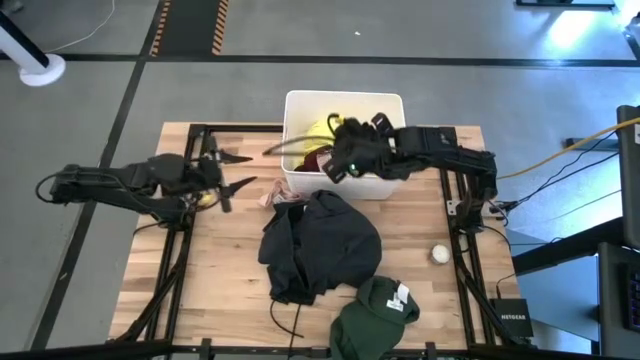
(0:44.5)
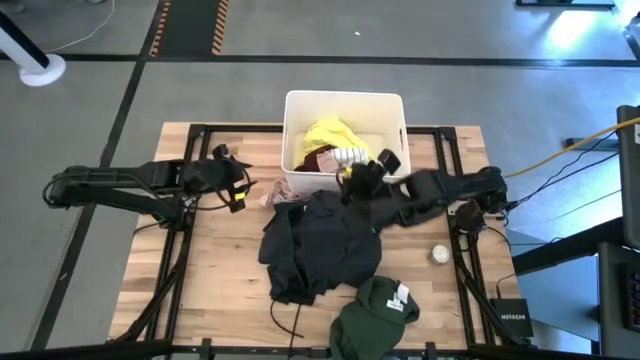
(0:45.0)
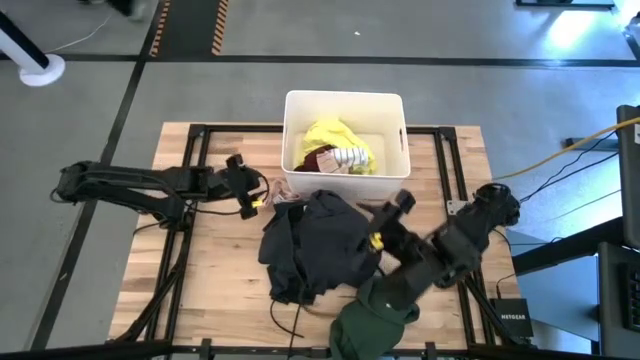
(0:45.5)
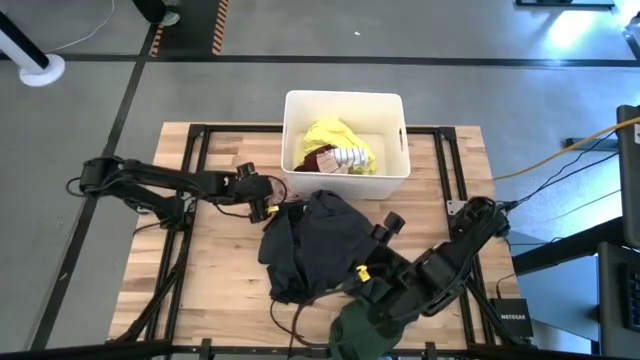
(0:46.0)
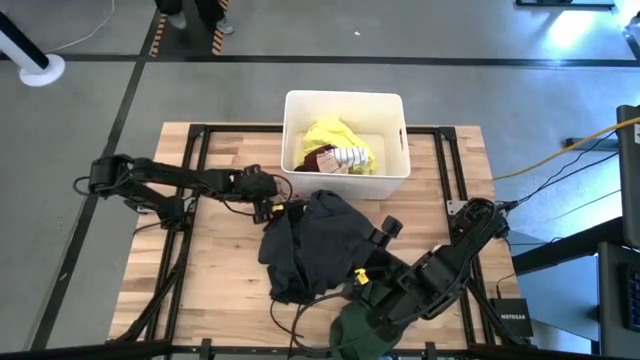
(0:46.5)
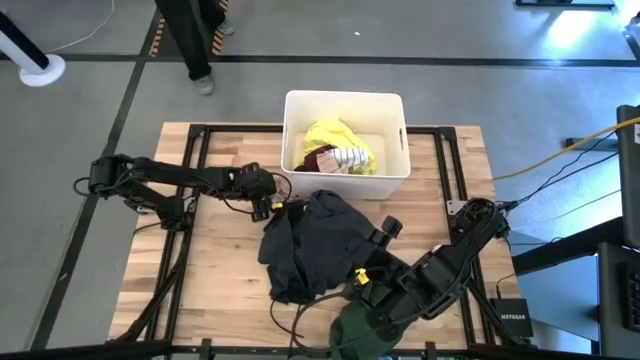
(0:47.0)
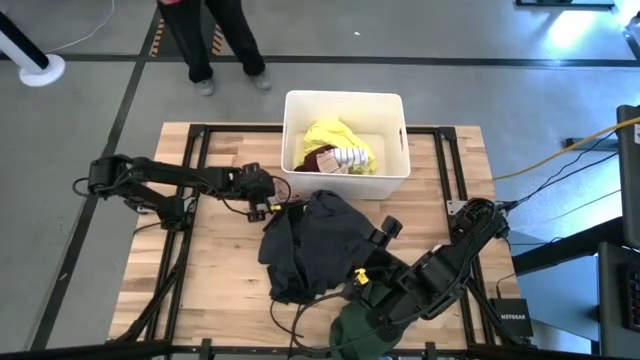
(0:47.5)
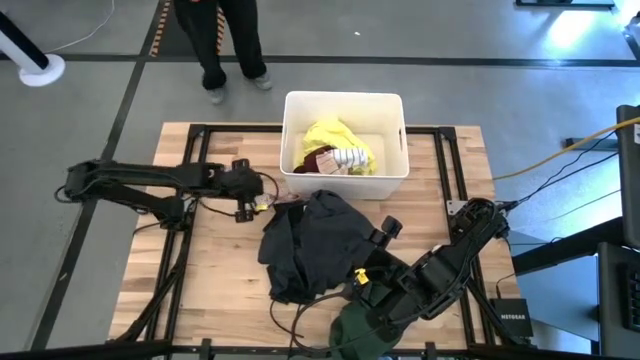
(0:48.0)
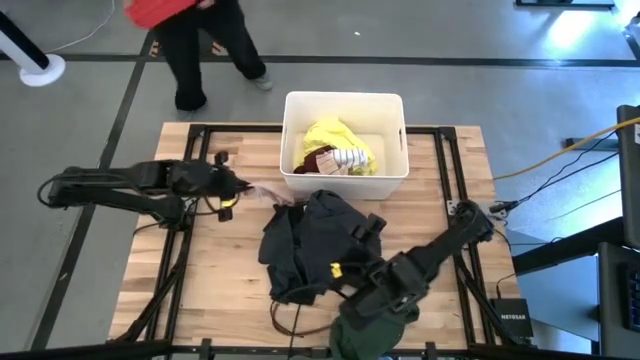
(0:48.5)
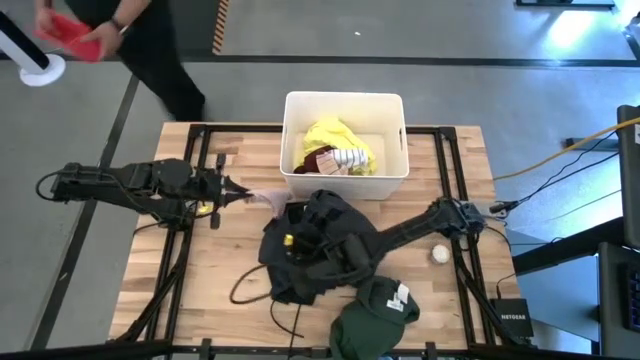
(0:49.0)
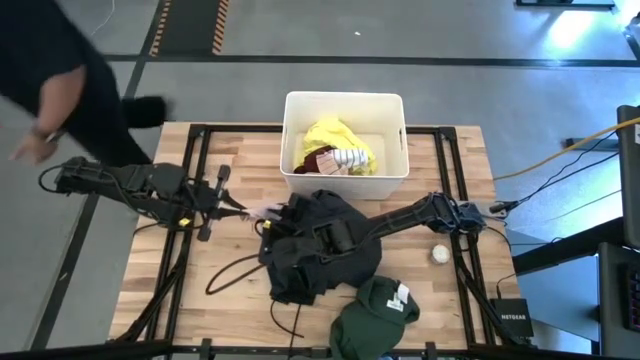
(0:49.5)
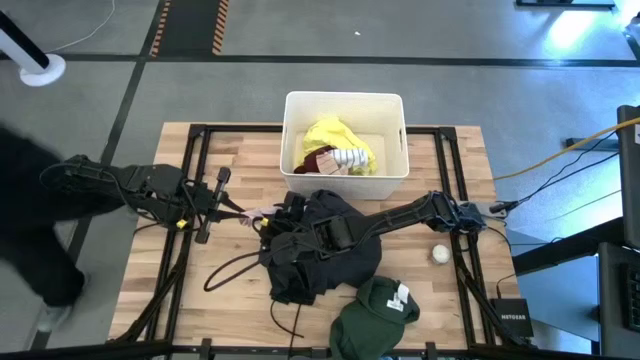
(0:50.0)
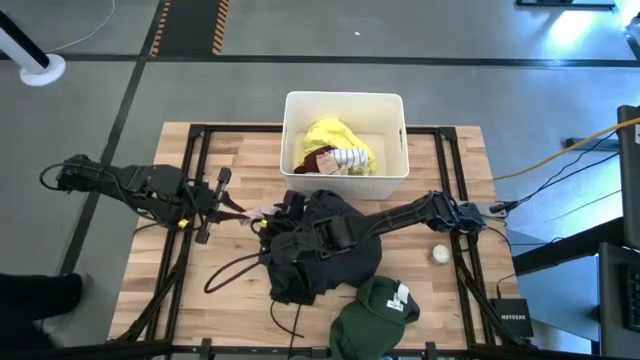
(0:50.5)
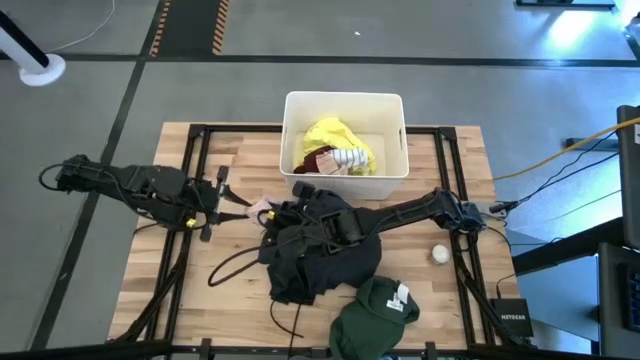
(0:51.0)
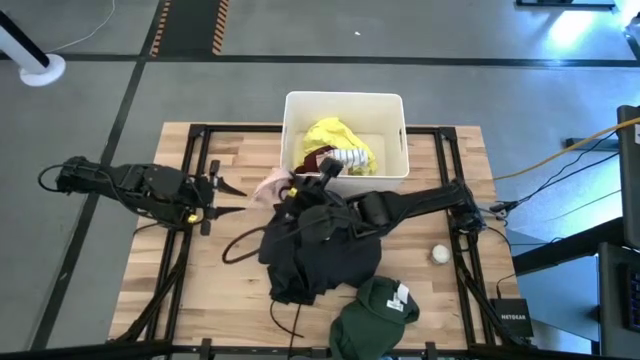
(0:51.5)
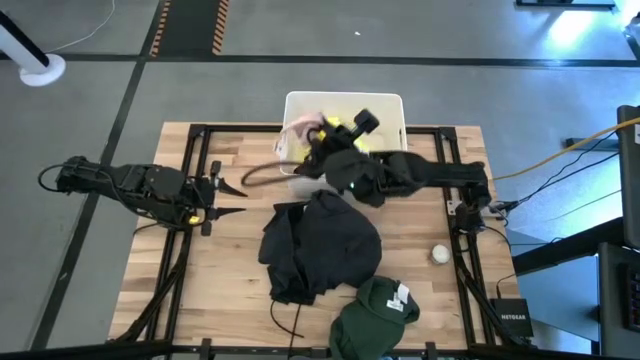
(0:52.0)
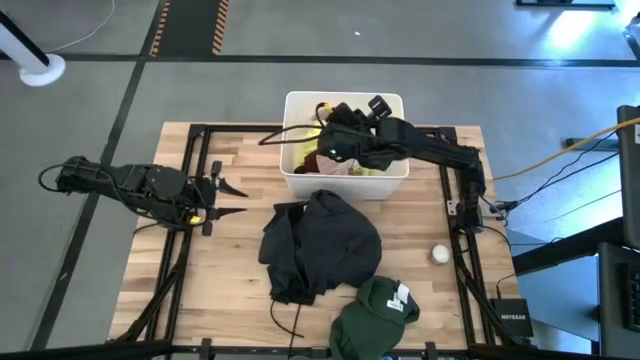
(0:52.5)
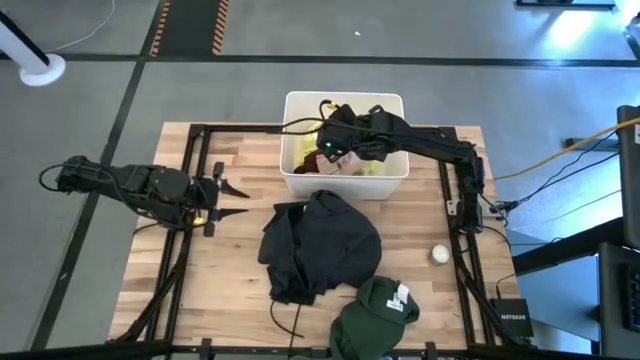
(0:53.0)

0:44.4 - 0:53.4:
Task: Sort clothes
Put the pink underwear into the white bin

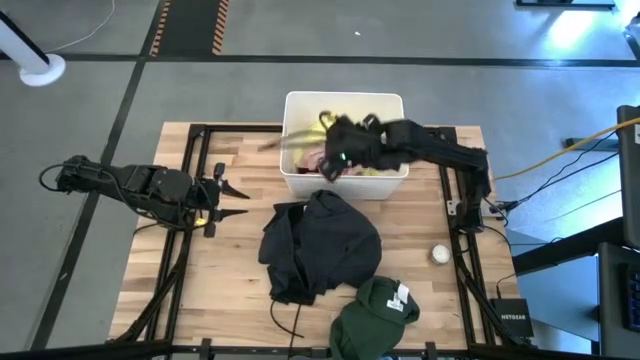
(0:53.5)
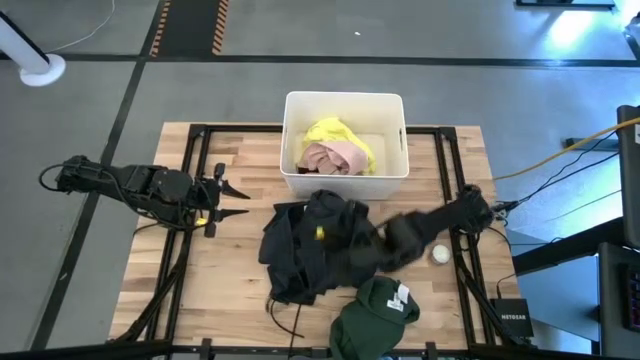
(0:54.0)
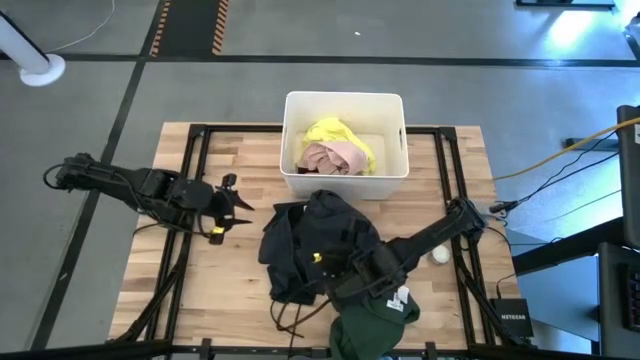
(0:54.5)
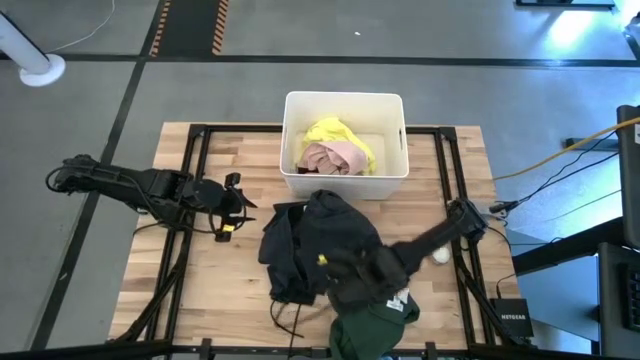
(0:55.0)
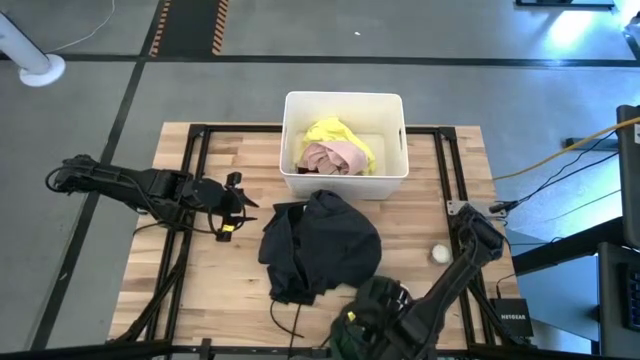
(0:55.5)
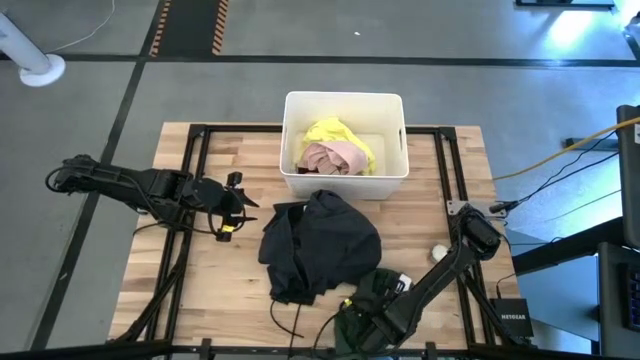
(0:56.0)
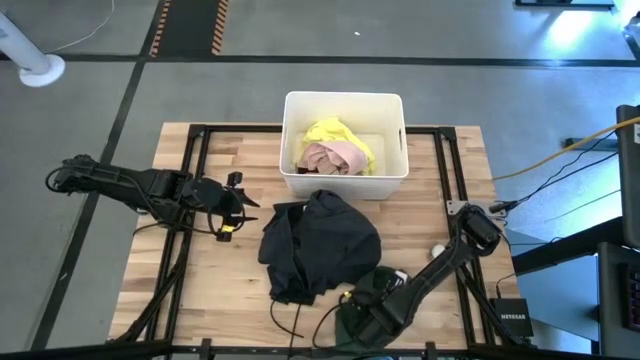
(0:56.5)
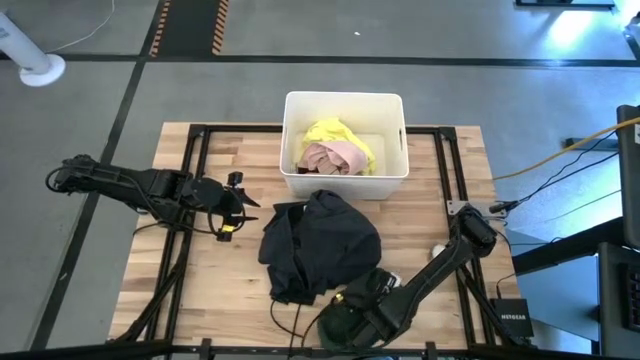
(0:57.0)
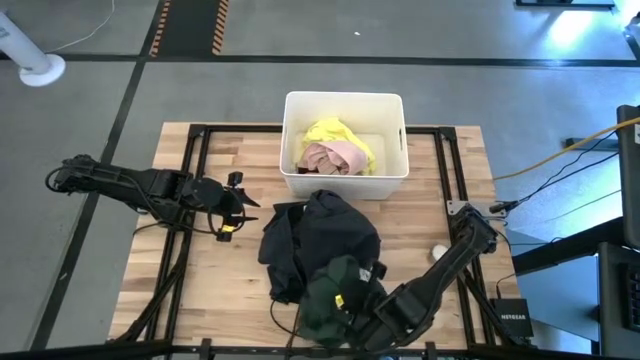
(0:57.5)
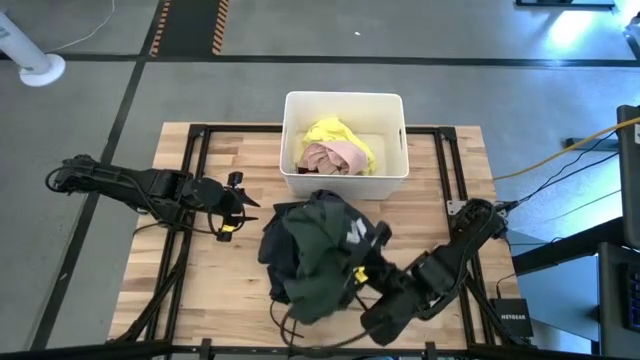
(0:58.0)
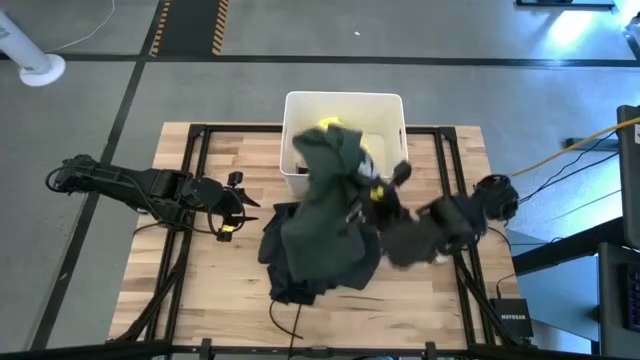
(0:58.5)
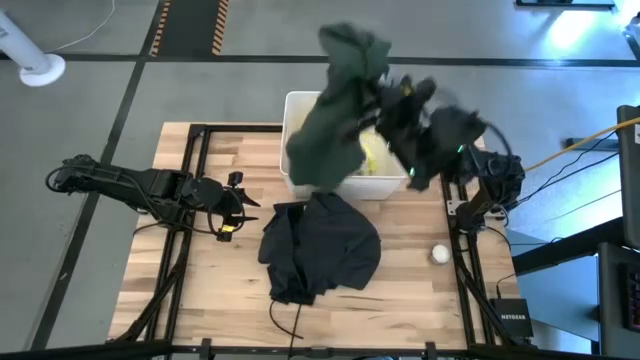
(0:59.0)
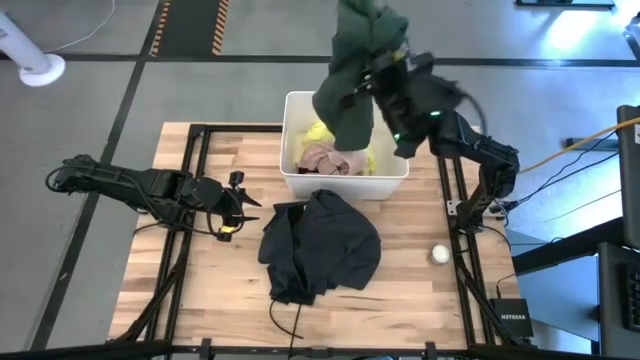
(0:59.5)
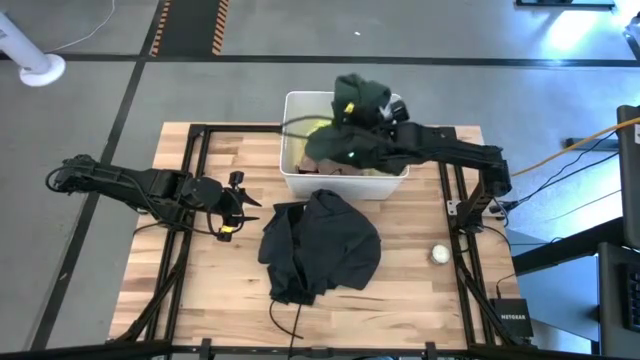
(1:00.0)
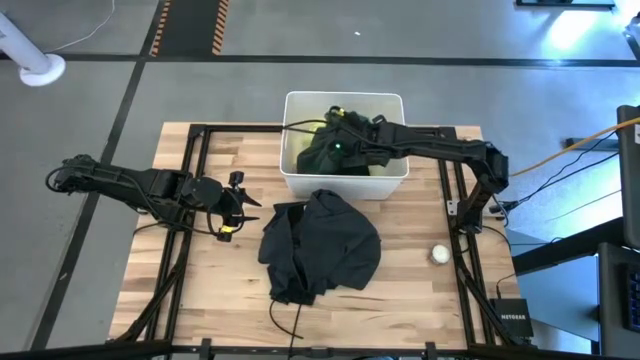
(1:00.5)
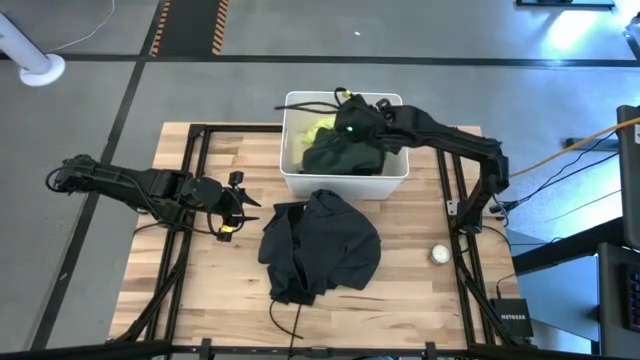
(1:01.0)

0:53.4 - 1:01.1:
Put the green shirt into the white bin

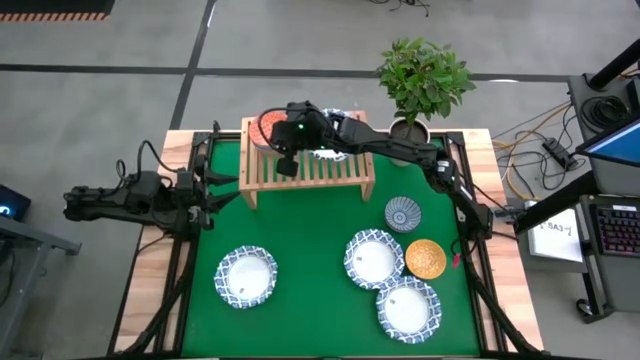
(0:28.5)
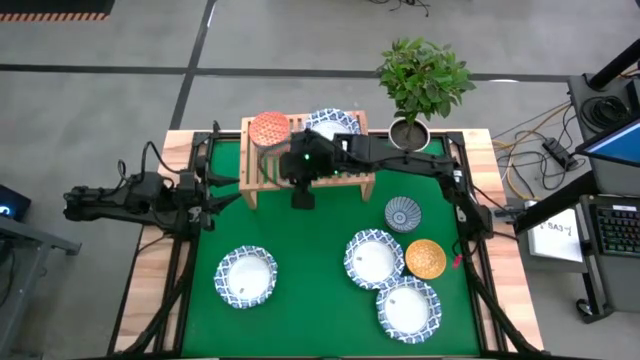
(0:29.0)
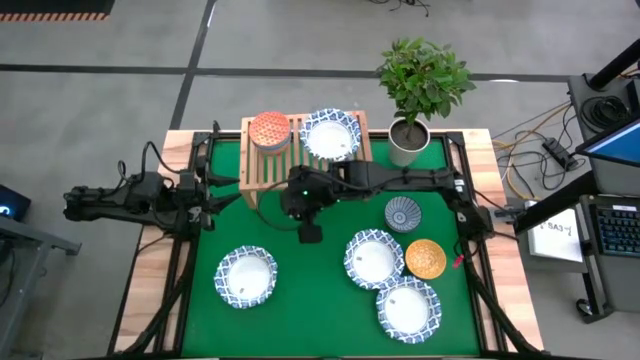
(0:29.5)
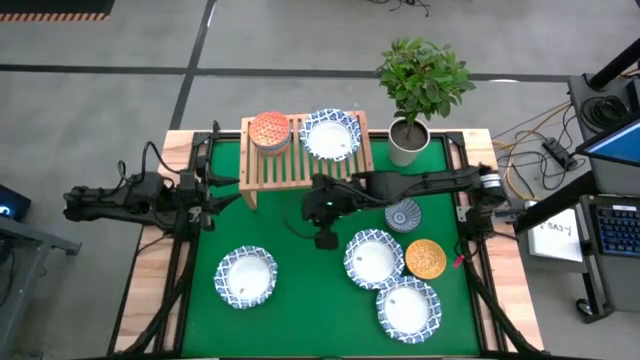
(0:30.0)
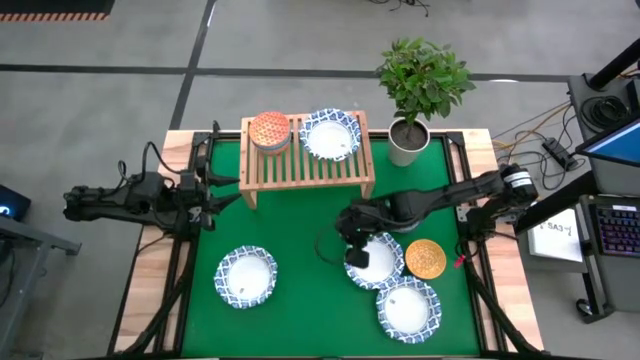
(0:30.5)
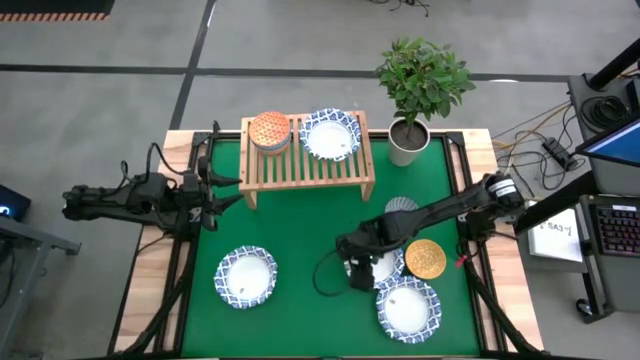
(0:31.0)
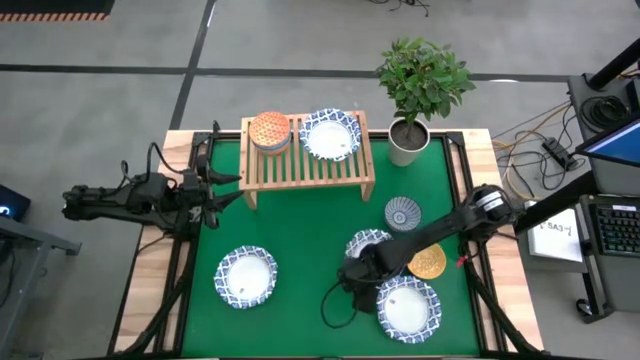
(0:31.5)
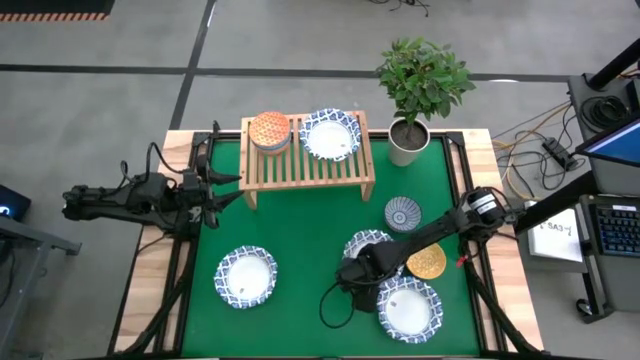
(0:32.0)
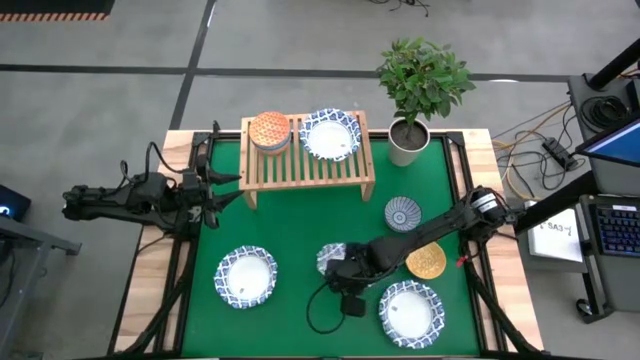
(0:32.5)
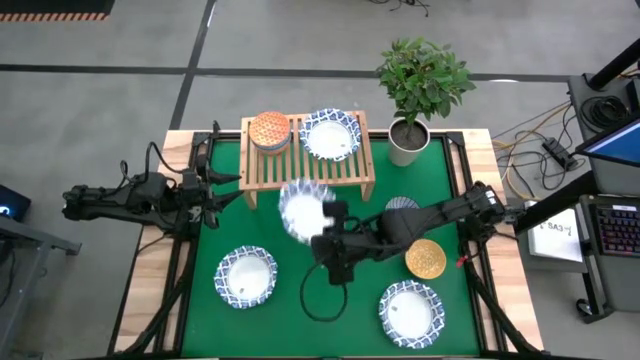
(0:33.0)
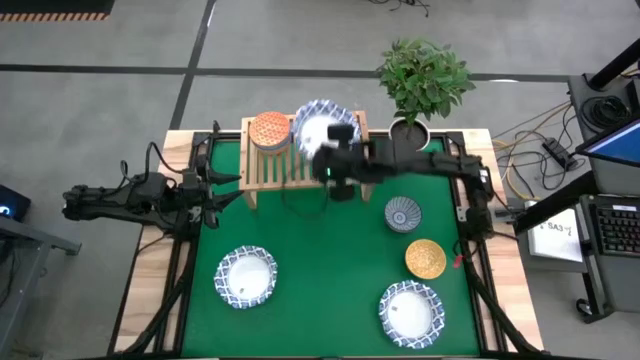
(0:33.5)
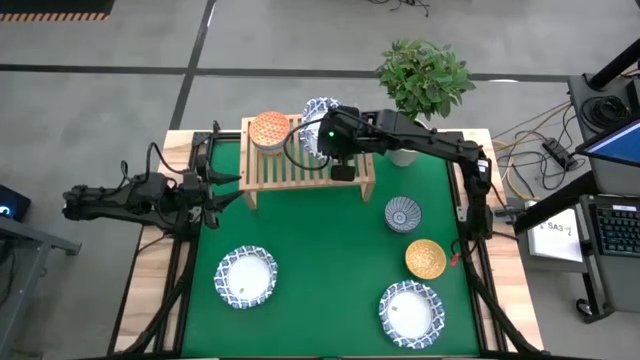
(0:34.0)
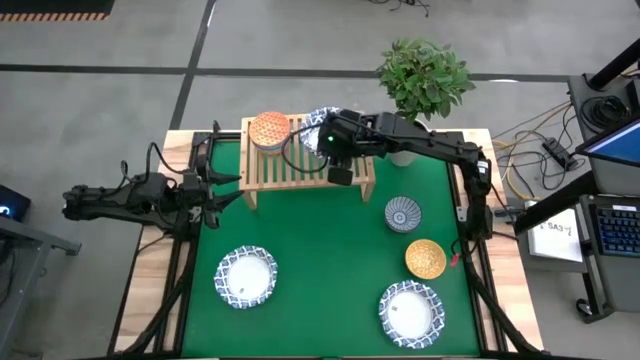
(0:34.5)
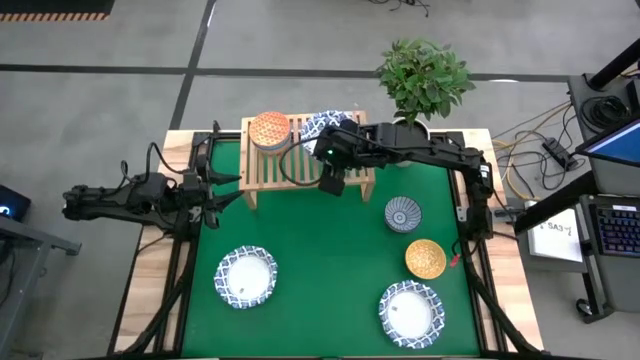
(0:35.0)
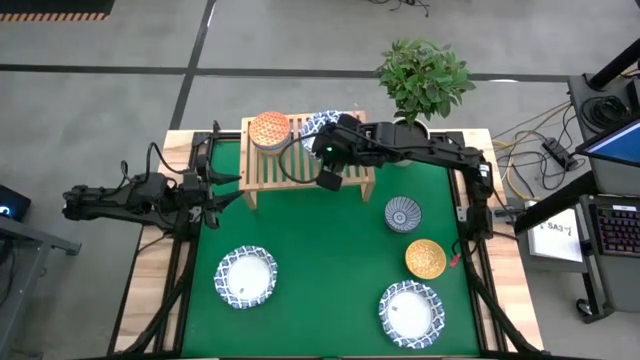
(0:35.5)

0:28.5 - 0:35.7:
Task: Place and stack bowls onto a shelf
Stack the white bowl on top of the white bowl on the shelf
